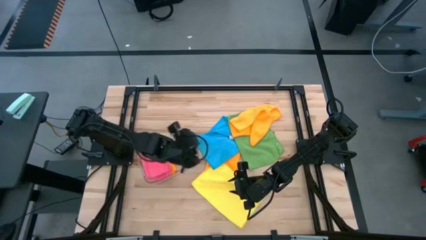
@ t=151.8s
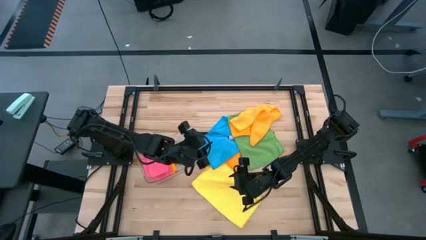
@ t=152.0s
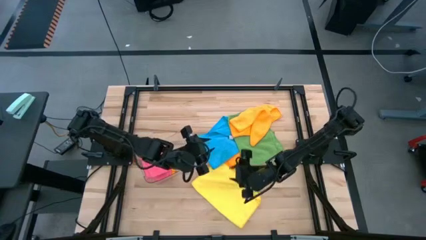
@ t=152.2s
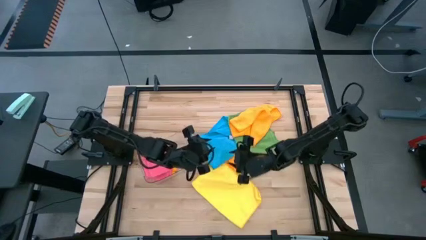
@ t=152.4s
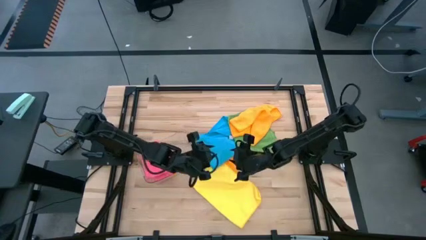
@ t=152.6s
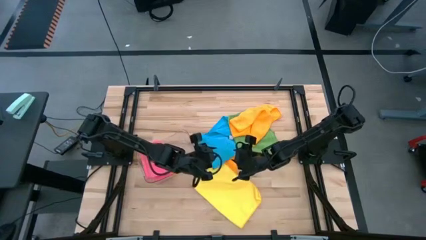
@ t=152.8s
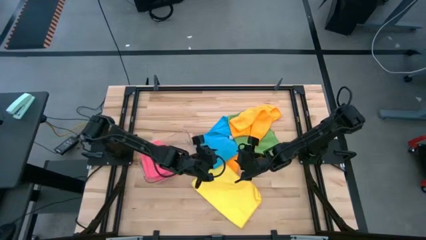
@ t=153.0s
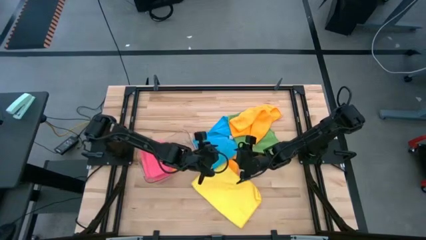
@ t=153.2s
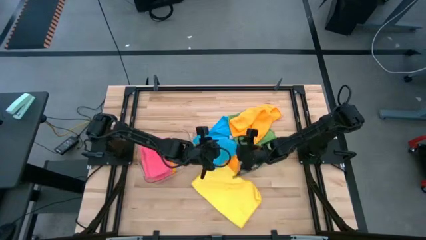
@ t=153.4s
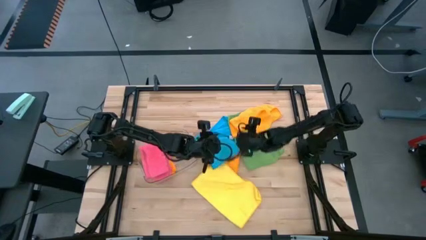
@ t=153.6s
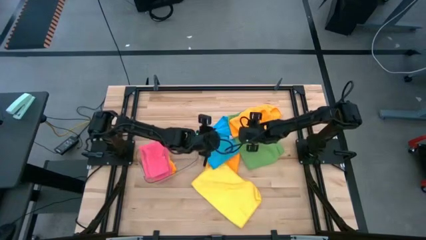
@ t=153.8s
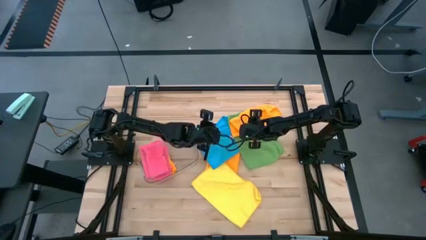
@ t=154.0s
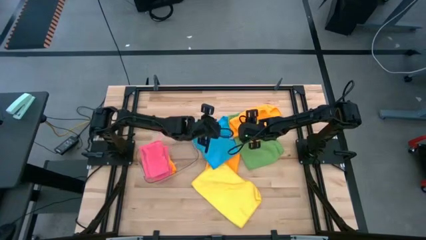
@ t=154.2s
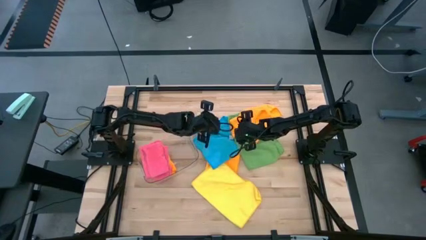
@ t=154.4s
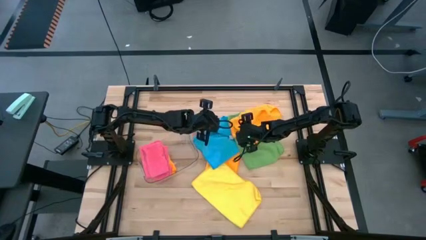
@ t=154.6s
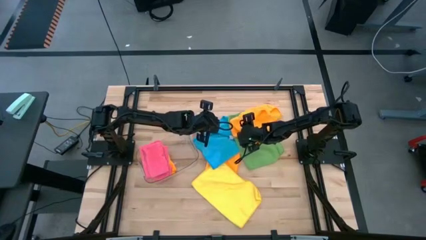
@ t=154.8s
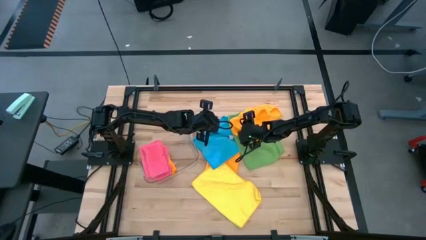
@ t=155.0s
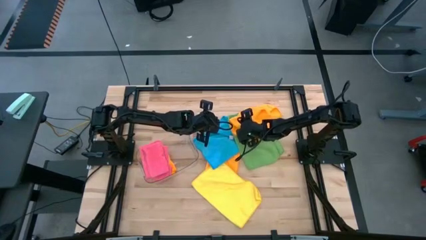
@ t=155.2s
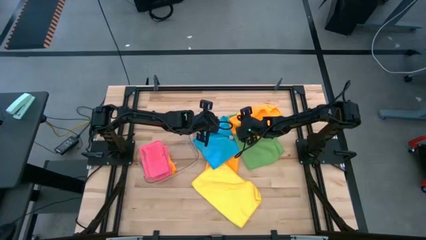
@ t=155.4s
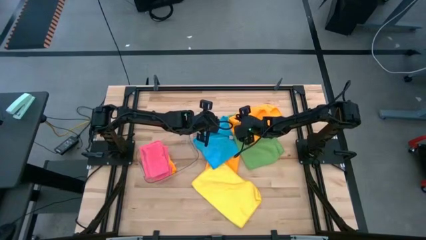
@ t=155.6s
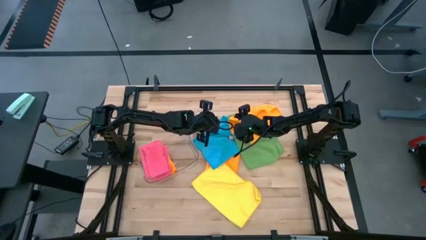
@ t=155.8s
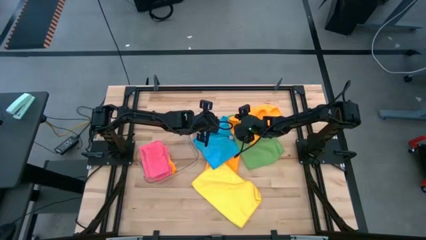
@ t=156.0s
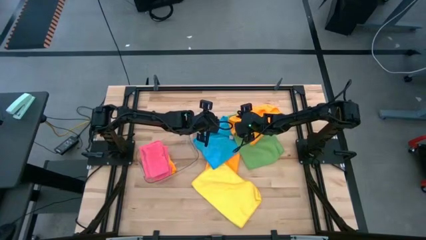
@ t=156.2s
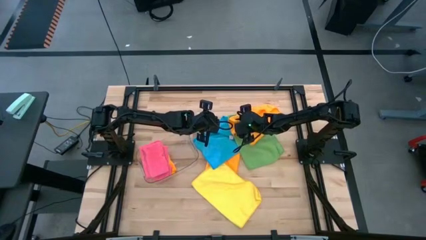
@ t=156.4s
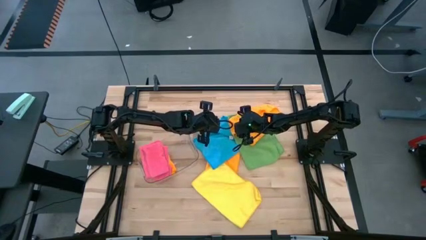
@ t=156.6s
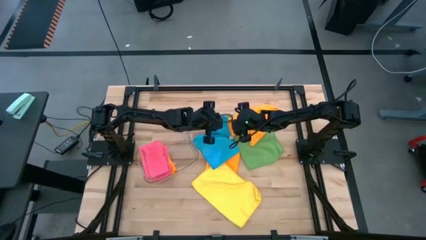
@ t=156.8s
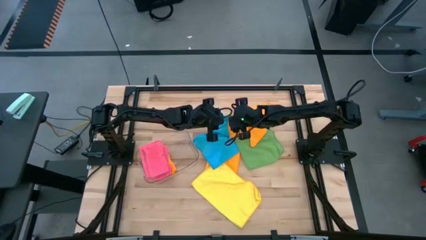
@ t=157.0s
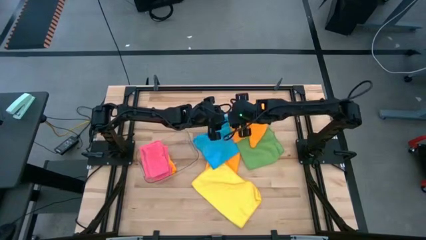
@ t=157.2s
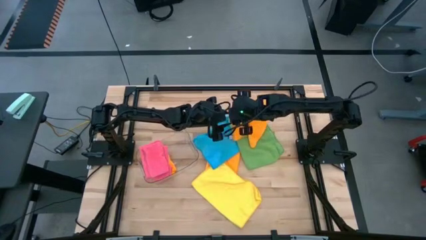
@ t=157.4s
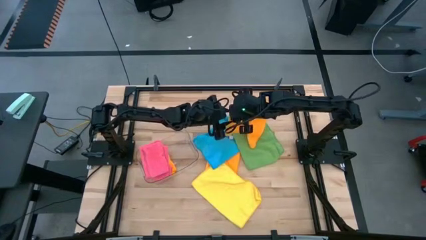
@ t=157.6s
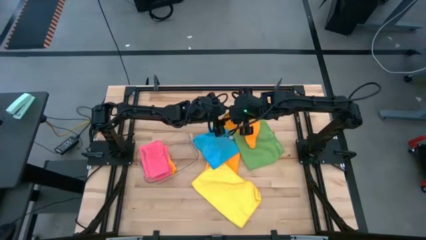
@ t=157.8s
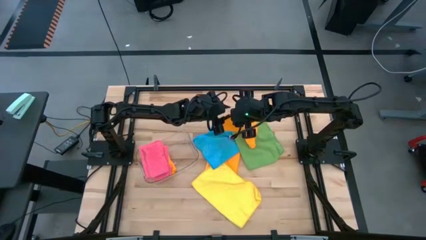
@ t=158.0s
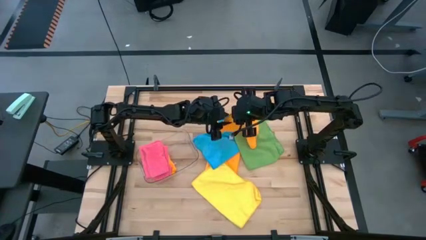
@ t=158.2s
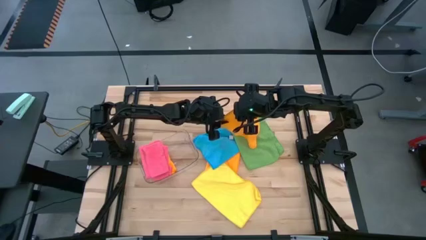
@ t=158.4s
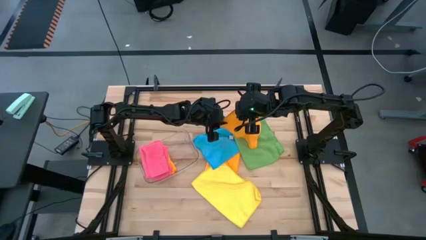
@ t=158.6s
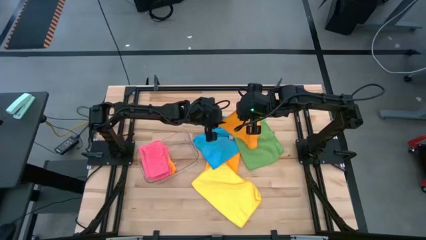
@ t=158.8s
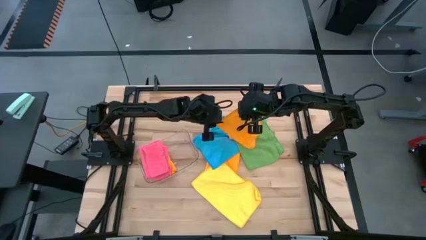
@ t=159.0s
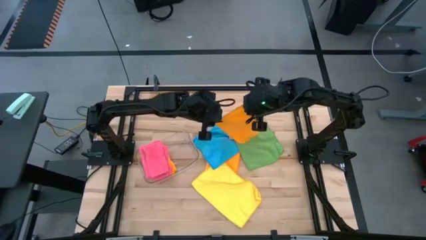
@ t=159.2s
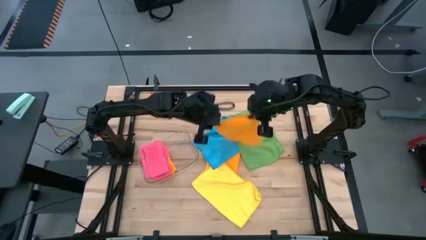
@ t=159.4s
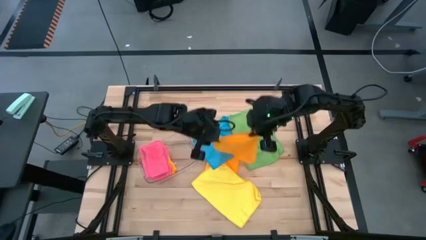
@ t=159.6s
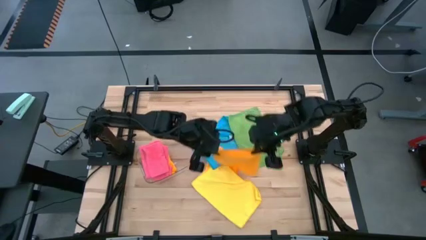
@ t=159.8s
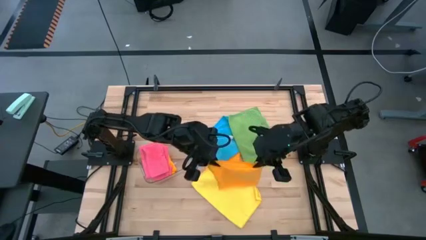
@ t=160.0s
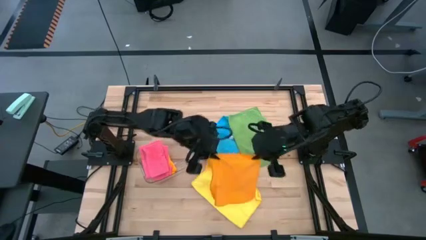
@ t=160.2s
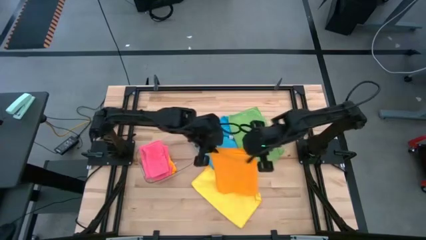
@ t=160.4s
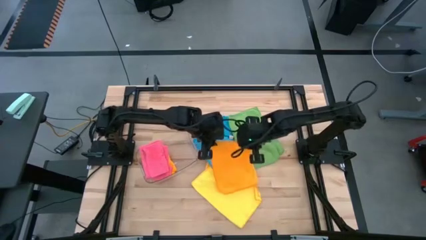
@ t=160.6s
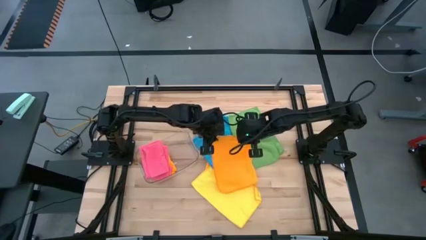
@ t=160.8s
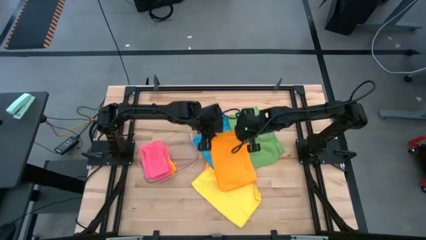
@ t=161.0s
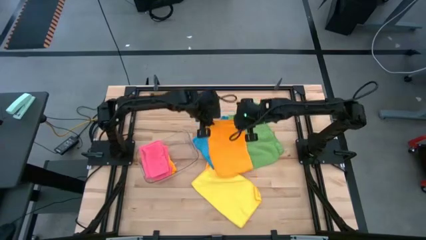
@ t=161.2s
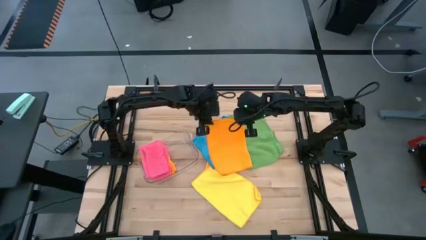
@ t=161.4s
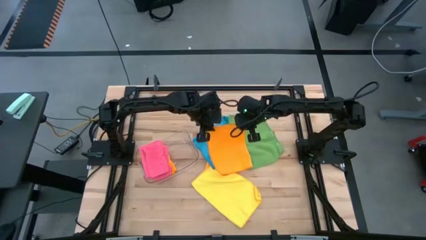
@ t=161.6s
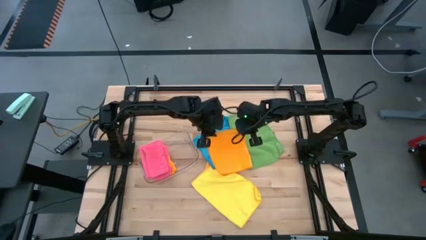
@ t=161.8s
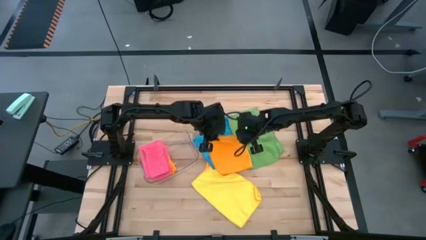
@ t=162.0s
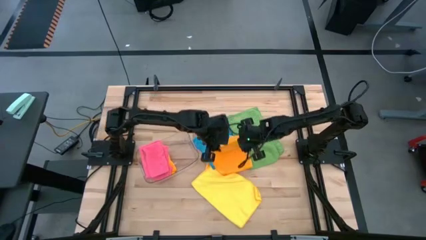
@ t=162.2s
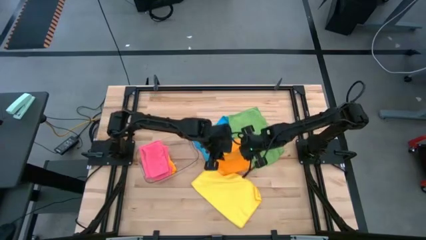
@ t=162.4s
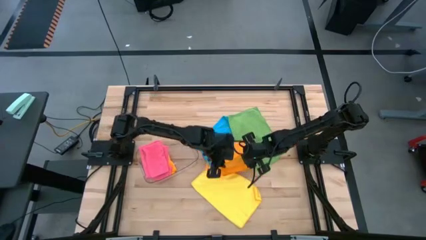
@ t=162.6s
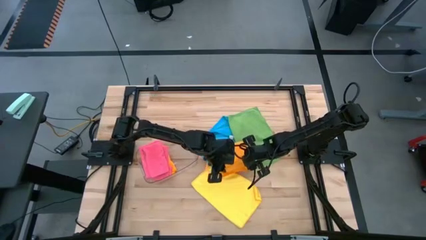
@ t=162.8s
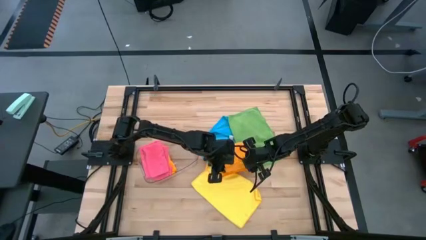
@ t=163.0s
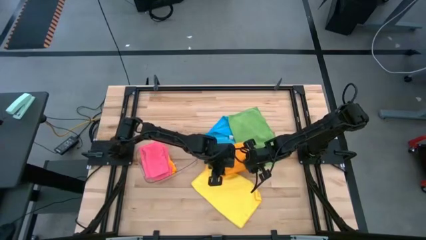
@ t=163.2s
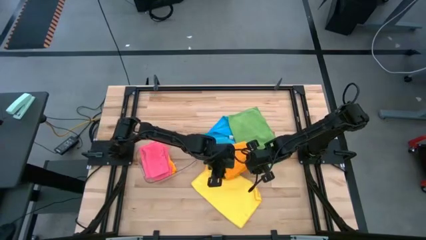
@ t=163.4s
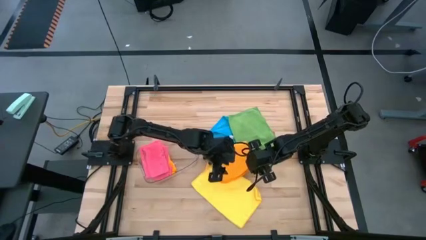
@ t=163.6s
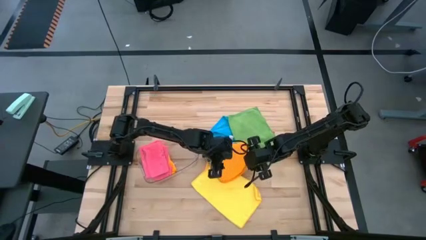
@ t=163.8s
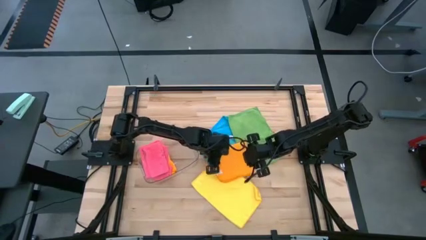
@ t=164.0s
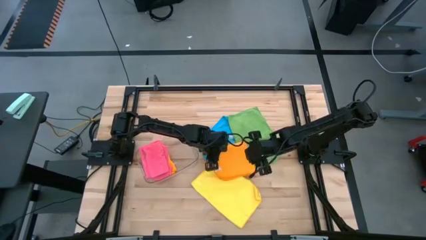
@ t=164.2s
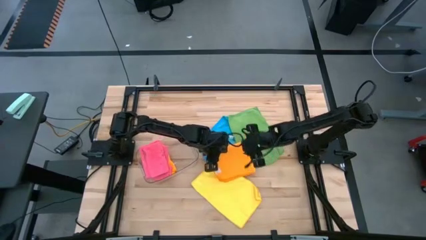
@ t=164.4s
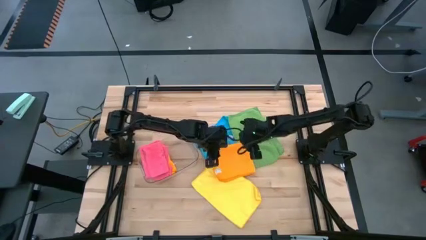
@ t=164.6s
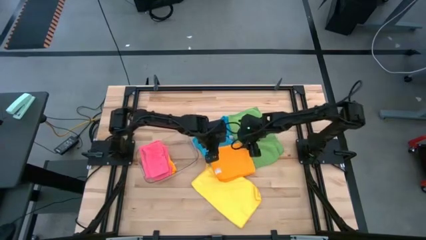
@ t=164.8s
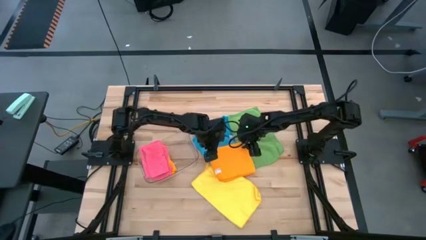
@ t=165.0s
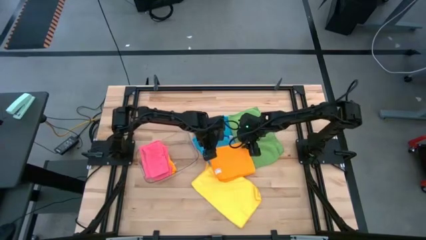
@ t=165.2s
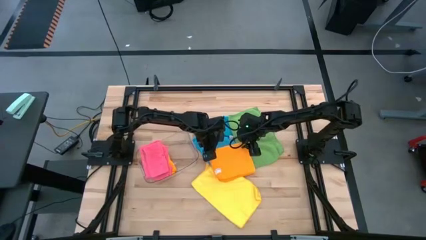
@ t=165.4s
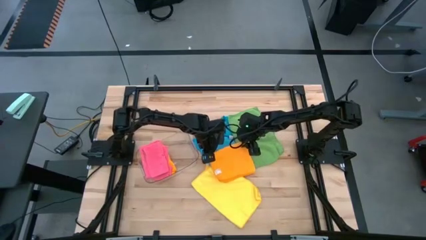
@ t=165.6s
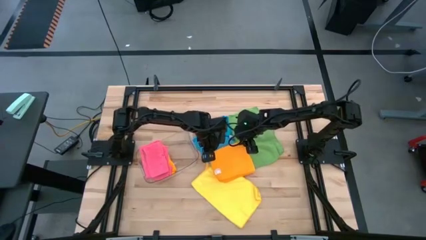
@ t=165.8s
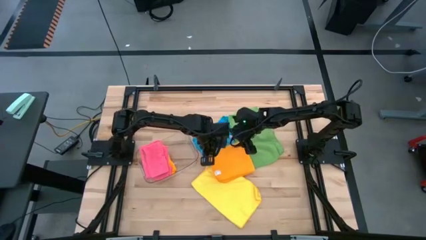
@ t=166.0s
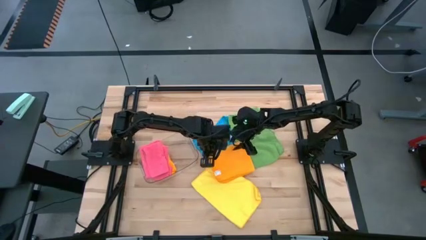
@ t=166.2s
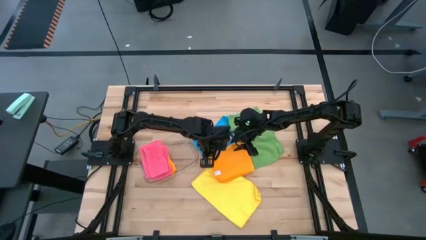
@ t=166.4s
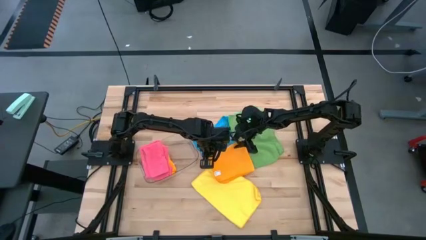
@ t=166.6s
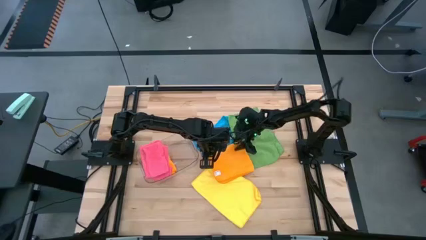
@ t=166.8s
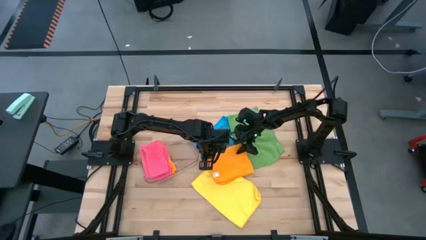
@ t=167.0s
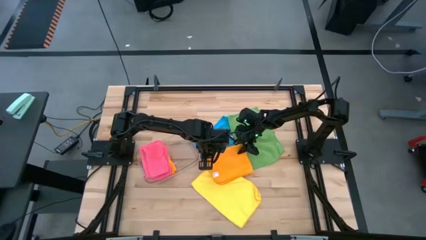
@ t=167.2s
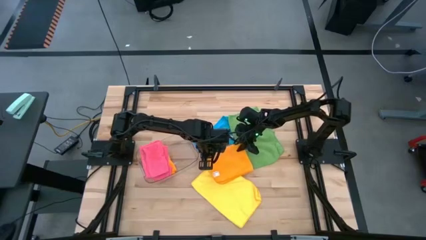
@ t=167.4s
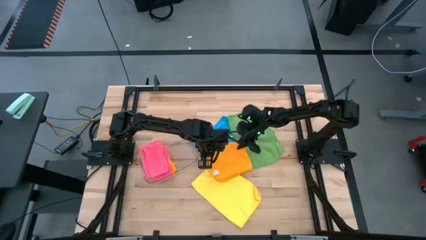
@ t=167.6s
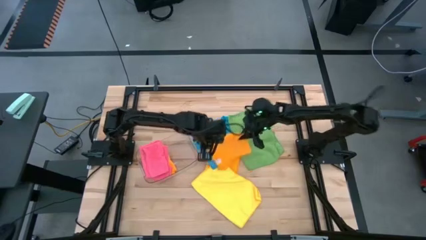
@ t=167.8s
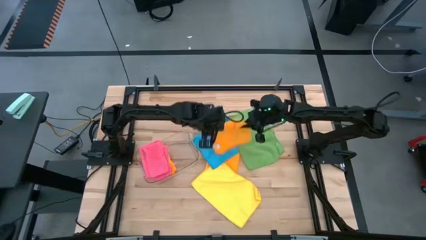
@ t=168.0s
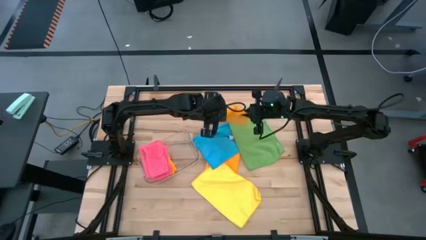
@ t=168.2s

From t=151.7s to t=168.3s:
Task: Fold microfiber towels
Fold the right orange microfiber cloth and put it into the transparent bin
